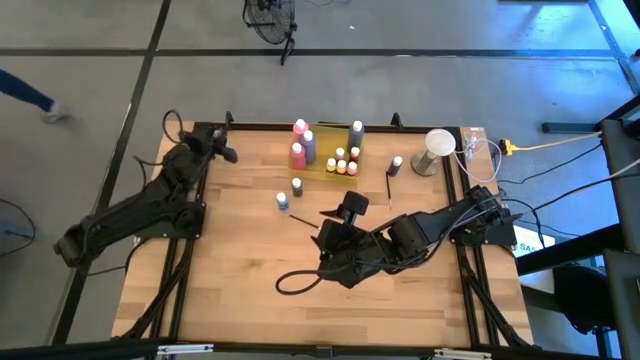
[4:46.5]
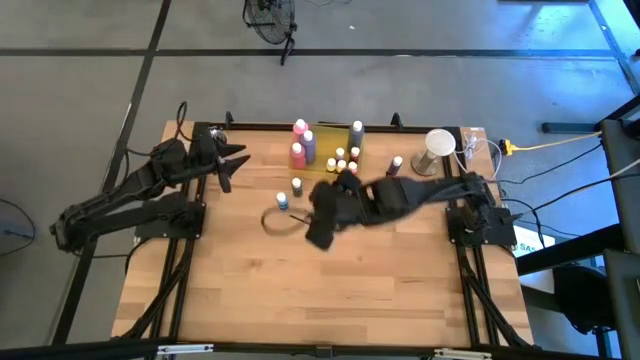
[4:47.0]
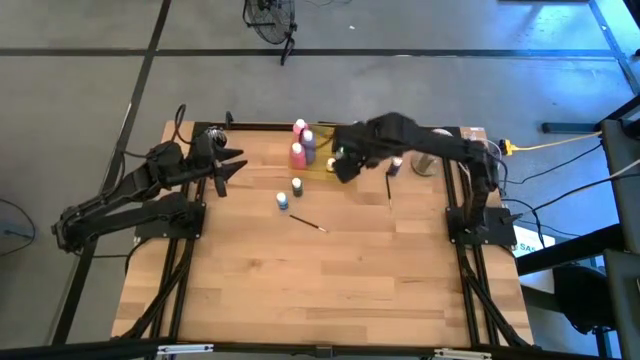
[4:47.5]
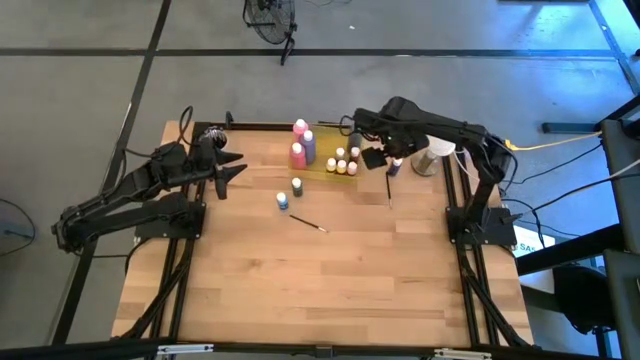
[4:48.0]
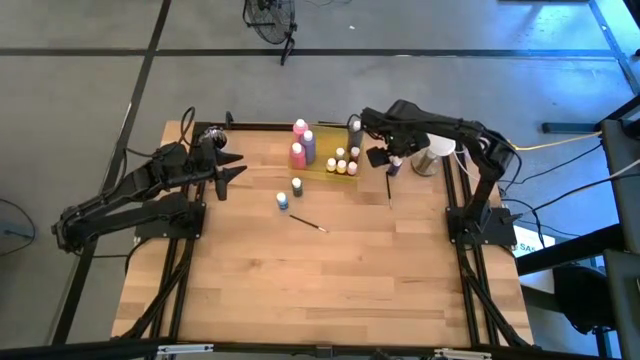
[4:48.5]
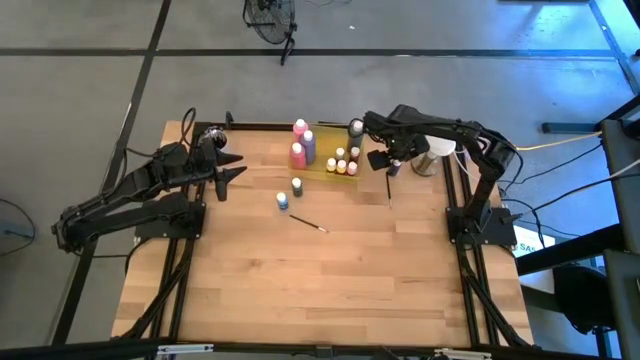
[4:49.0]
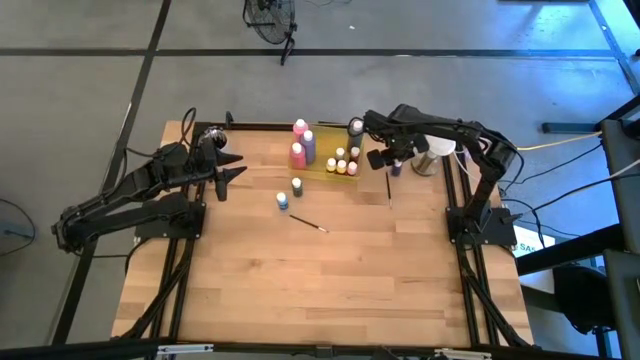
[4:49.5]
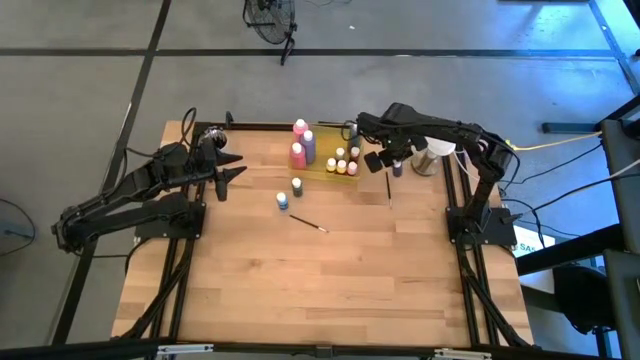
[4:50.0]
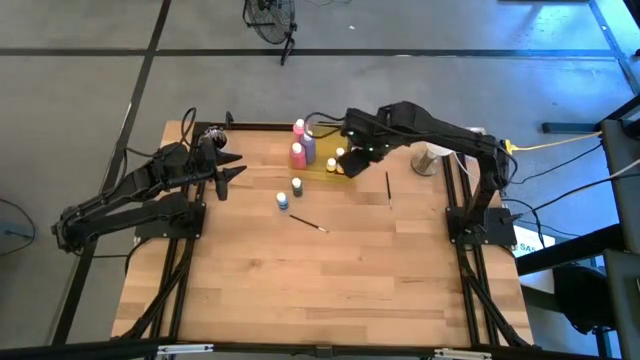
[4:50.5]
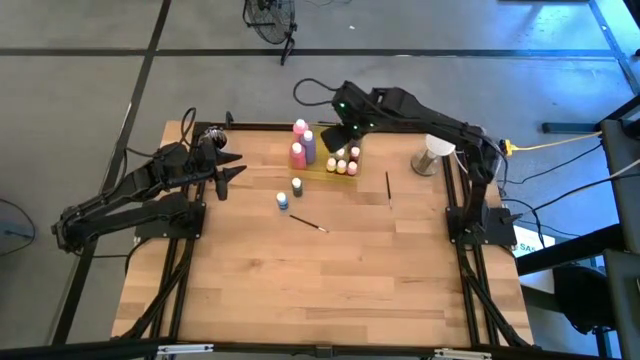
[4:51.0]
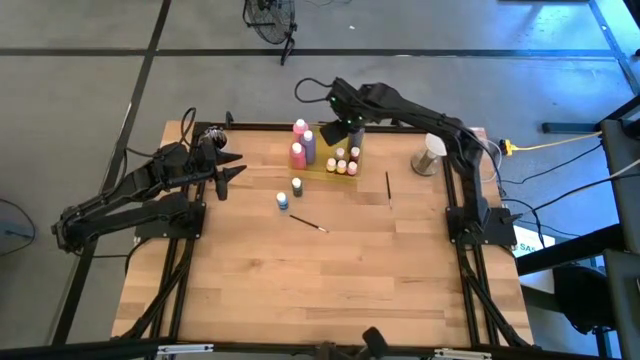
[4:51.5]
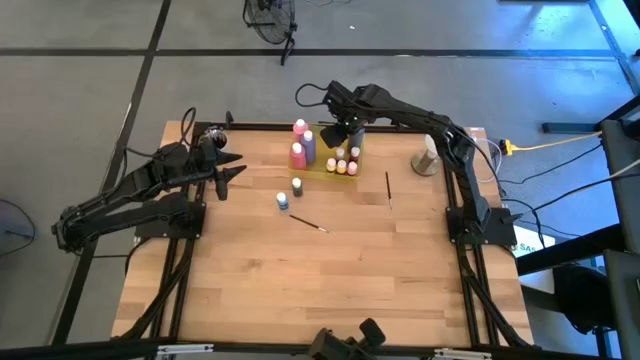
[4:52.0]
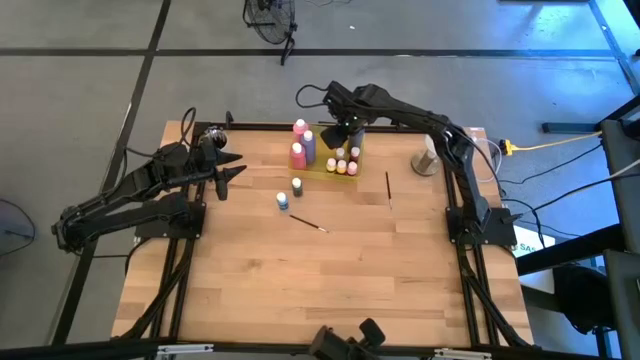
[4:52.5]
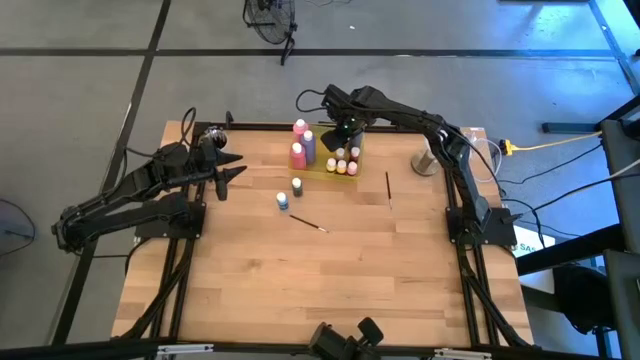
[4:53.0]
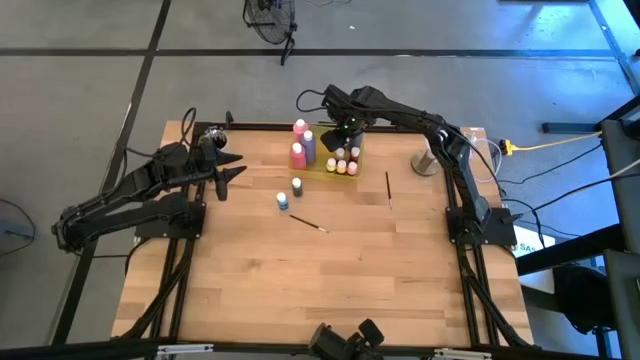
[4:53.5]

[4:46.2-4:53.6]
Task: Pick & Place Paint Supplies
Put the small blue paint bottle into the yellow bin

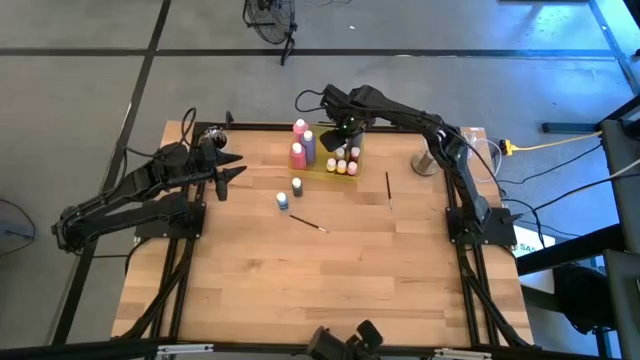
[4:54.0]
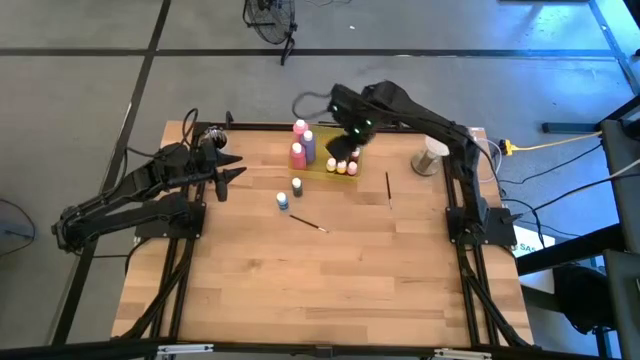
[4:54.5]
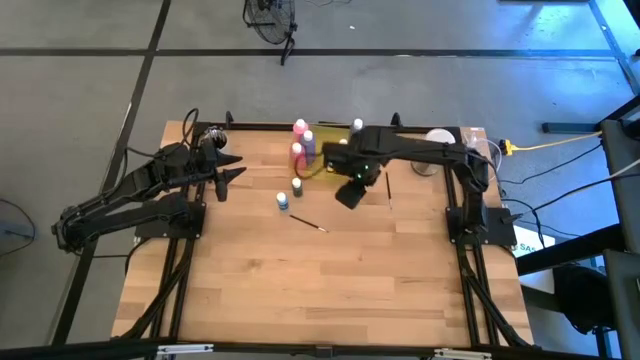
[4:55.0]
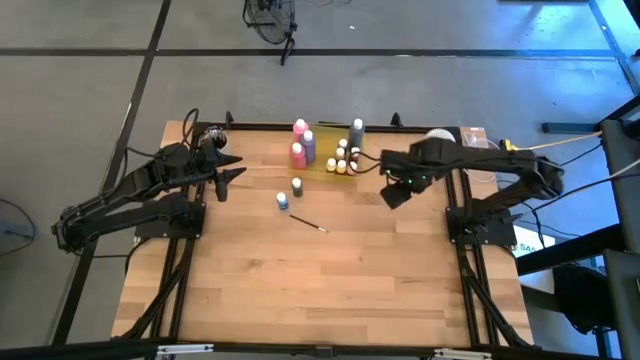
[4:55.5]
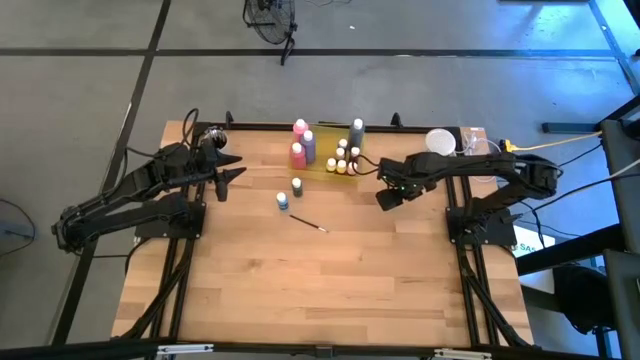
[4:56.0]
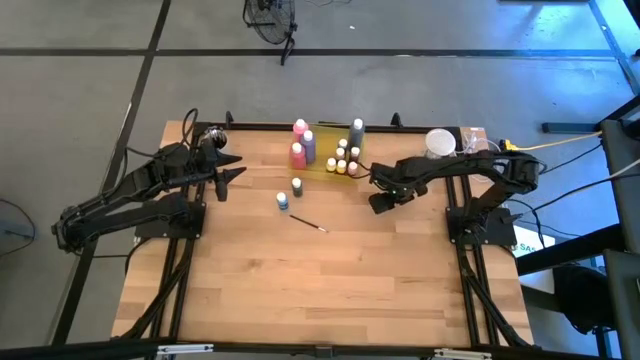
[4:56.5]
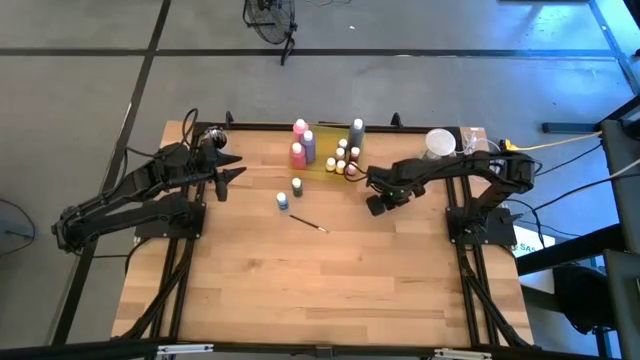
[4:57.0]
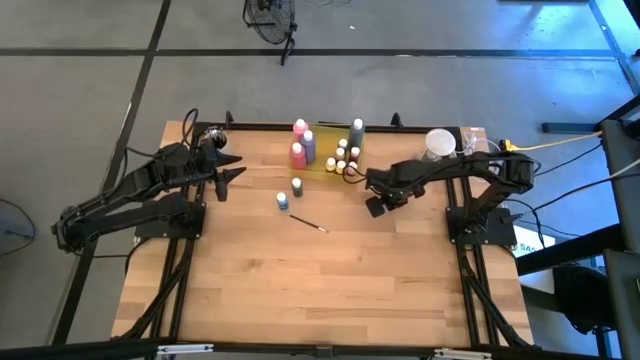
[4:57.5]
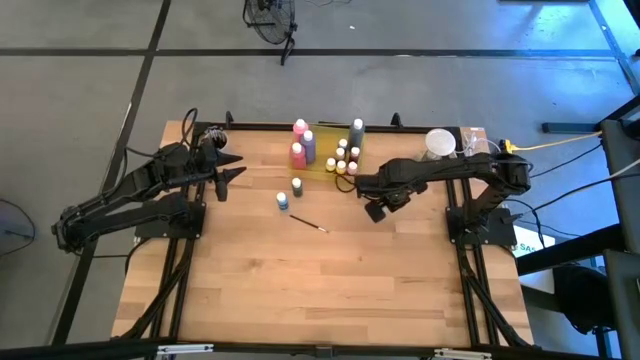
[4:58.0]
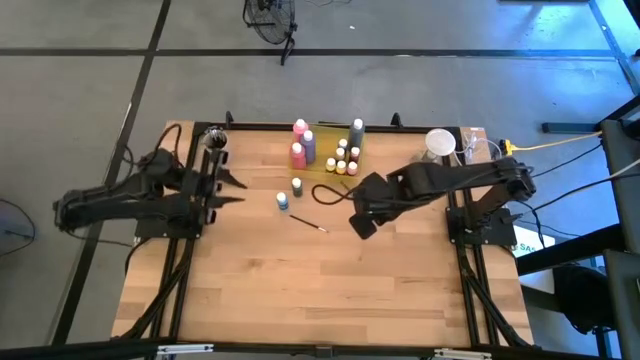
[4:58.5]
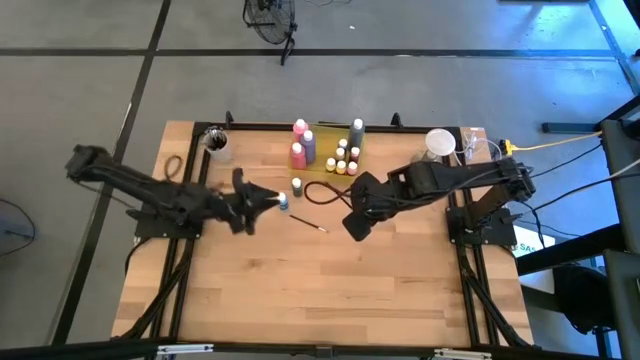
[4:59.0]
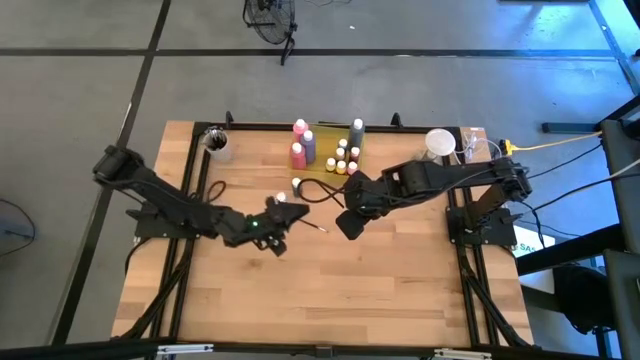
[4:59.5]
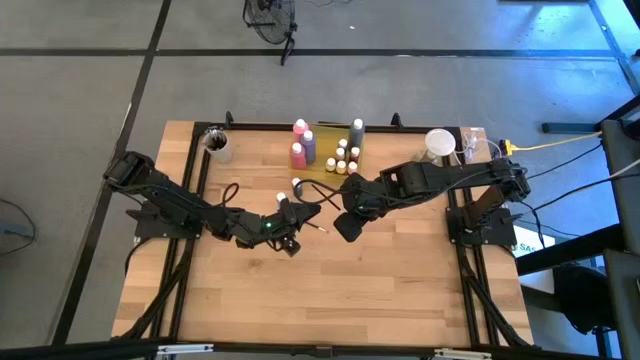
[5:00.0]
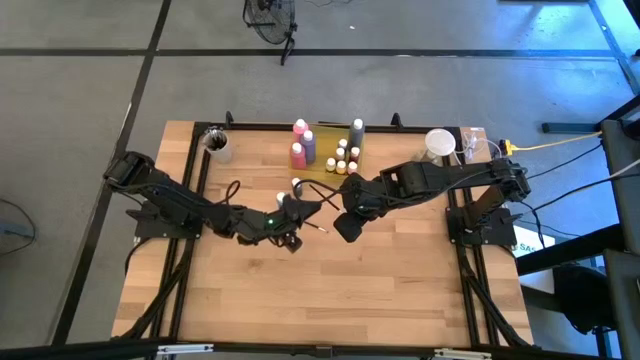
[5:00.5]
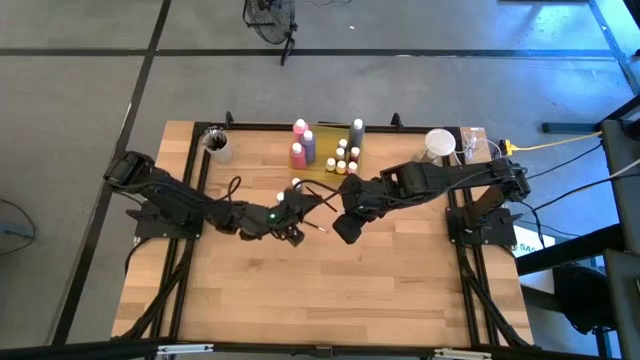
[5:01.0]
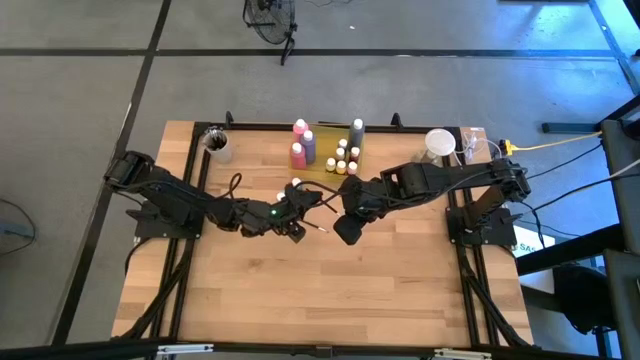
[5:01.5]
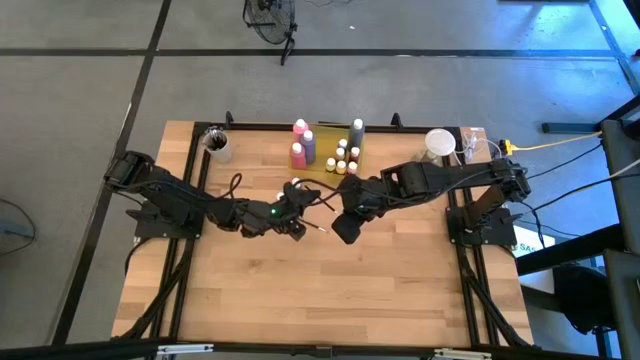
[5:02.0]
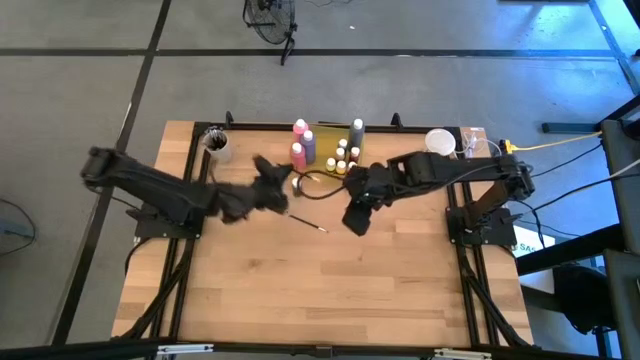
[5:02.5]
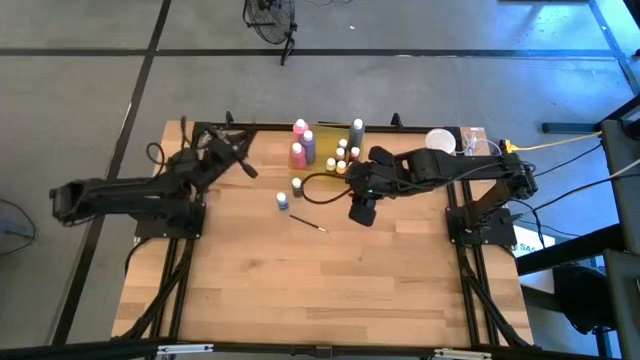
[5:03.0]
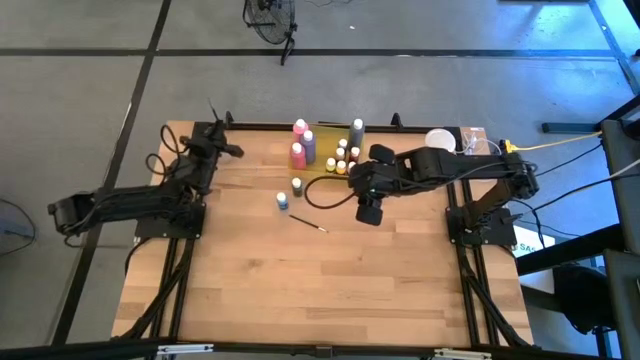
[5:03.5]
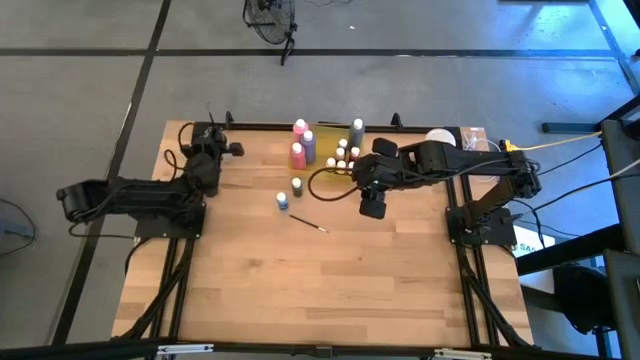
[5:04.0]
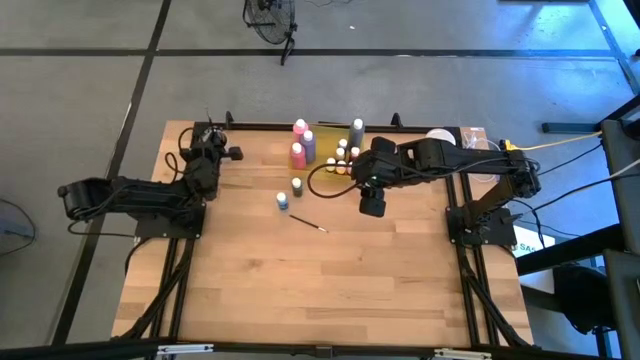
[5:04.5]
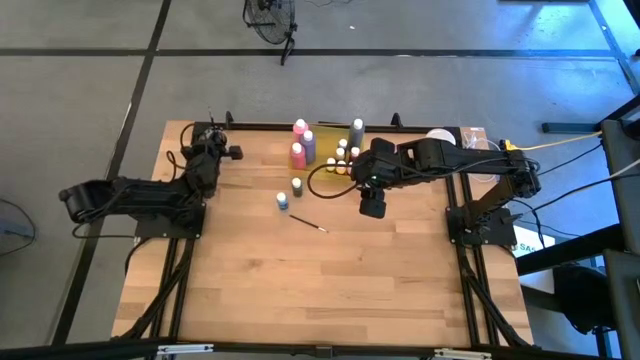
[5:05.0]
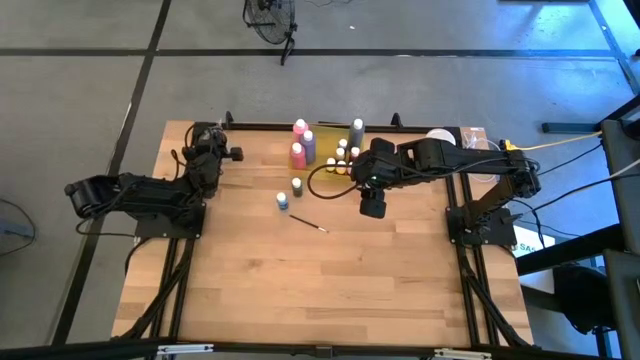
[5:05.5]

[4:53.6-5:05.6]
Put the silver paintbrush into the white cup

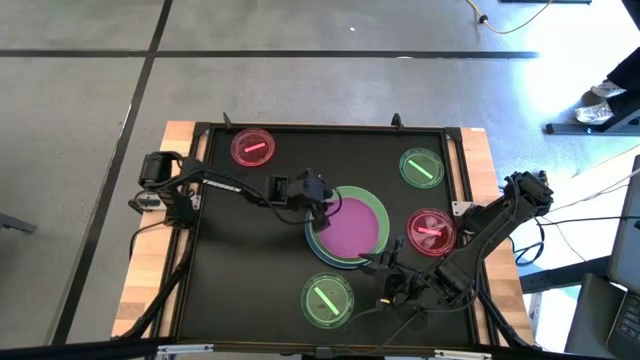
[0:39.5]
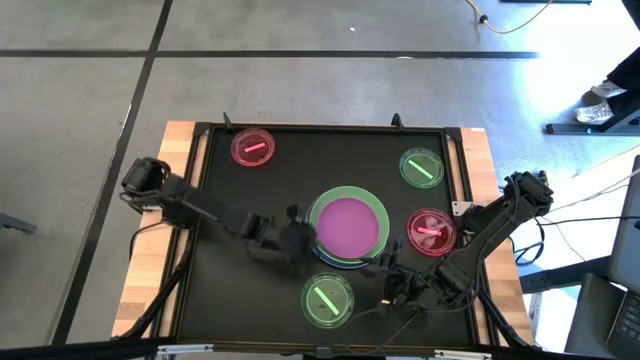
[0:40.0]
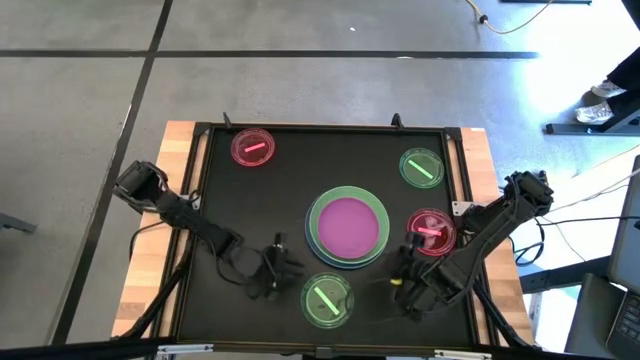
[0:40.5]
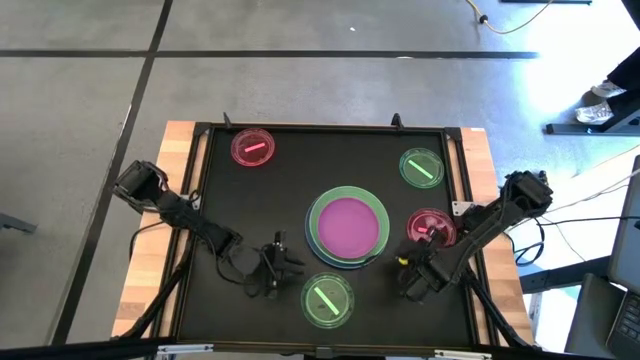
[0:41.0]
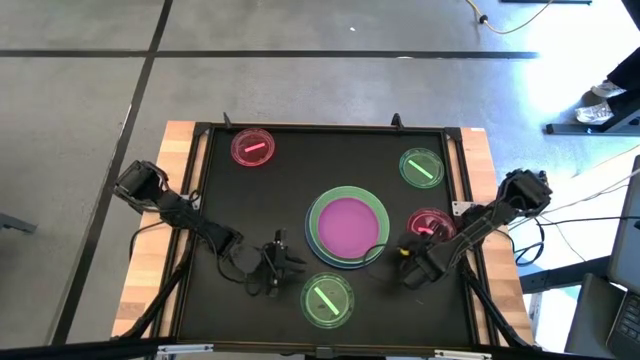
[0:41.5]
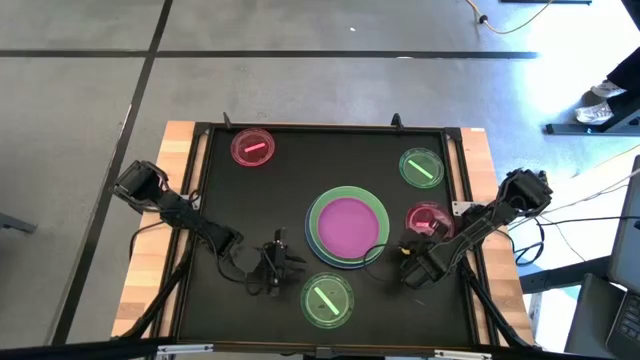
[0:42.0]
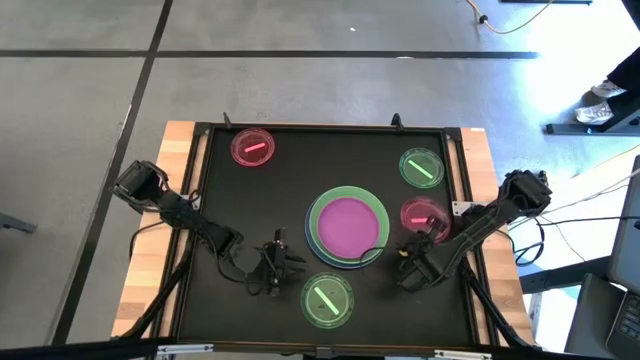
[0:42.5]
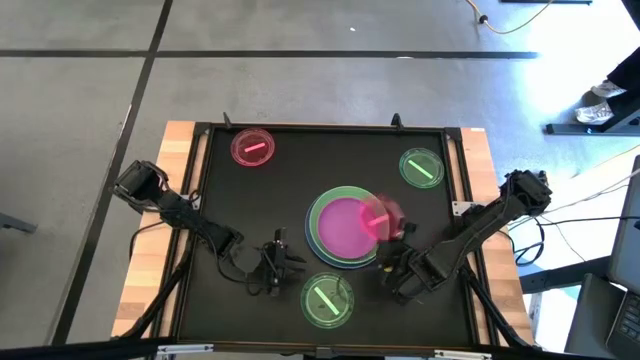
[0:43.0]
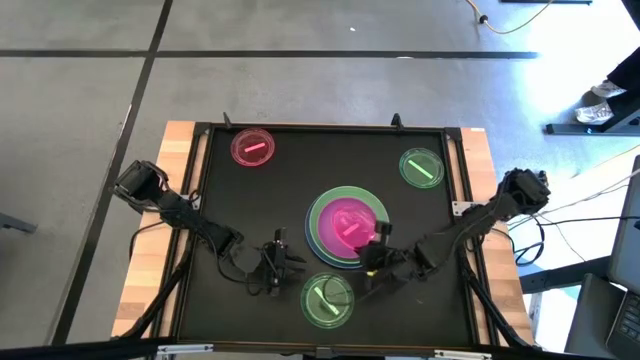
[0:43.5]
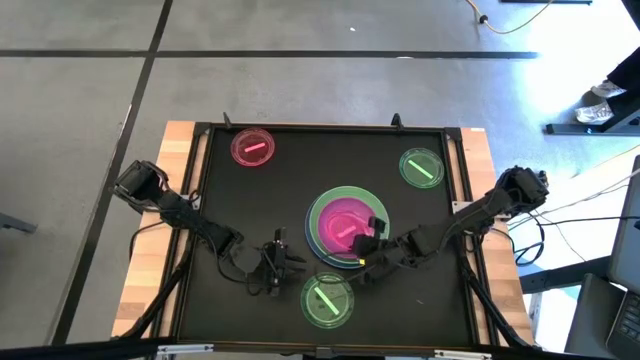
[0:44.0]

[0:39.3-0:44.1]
Task: Stack plastic plates
Stack the right red plate on top of the pink plate
